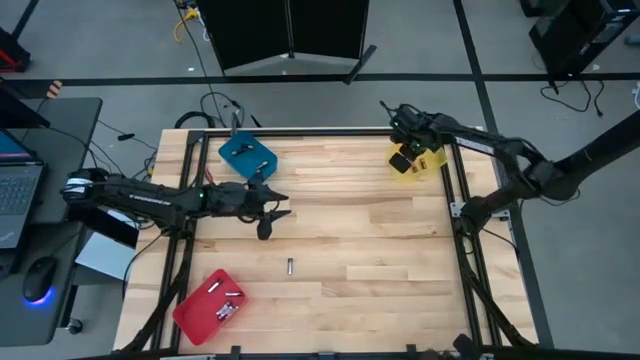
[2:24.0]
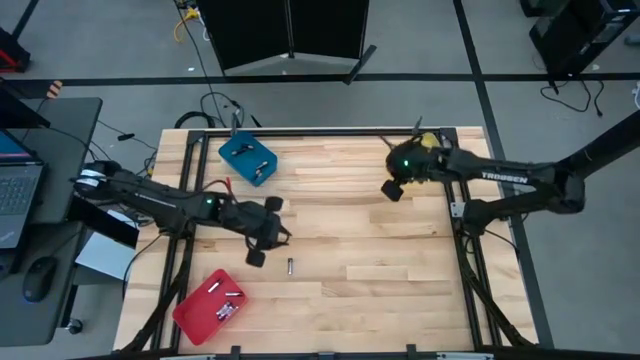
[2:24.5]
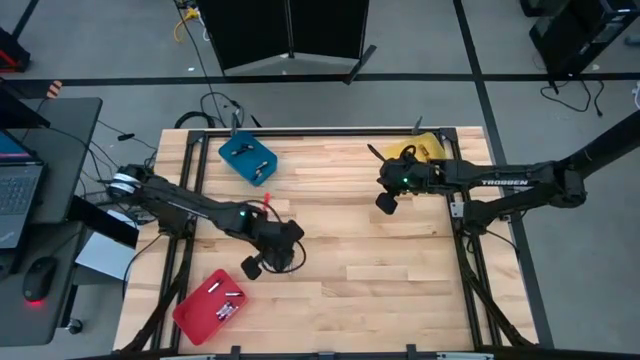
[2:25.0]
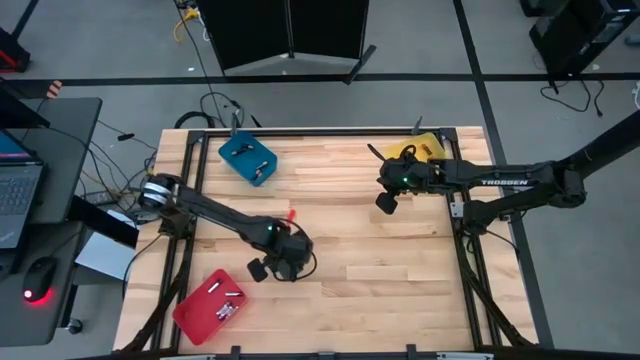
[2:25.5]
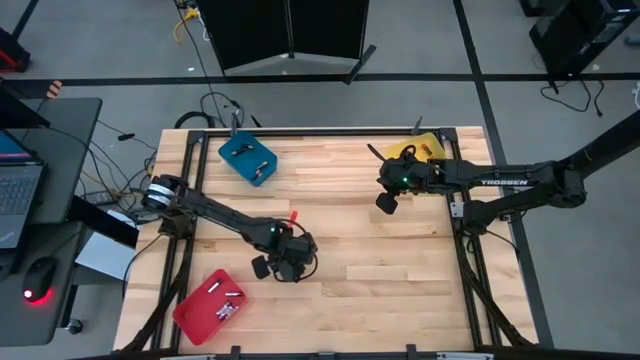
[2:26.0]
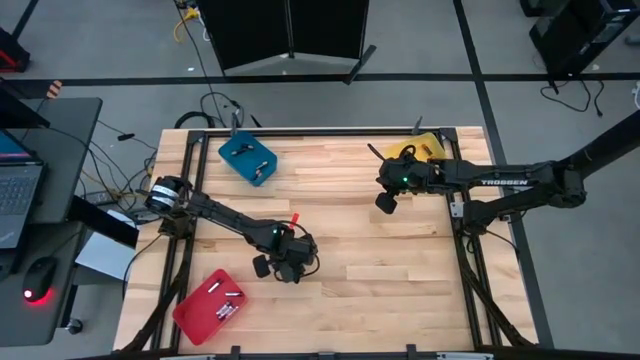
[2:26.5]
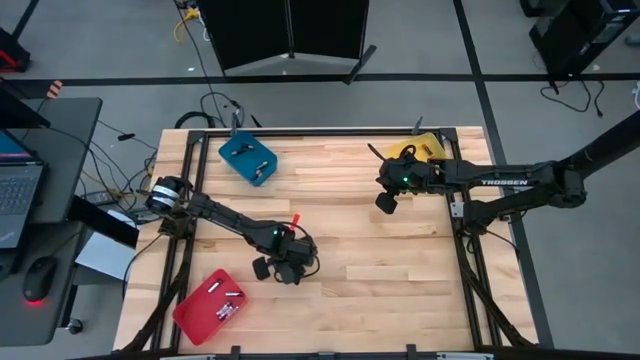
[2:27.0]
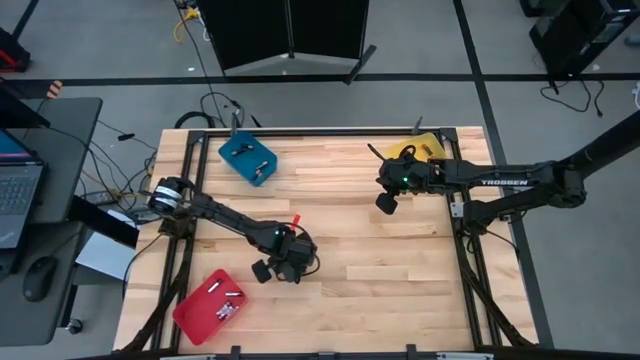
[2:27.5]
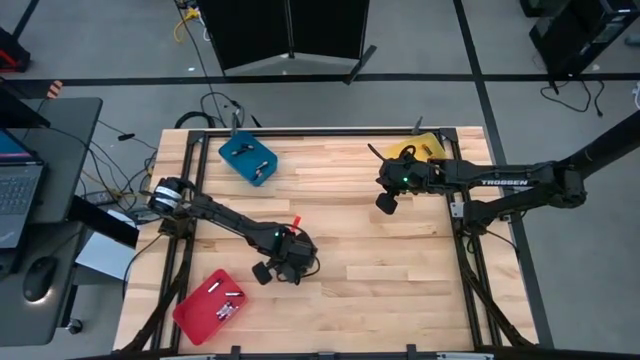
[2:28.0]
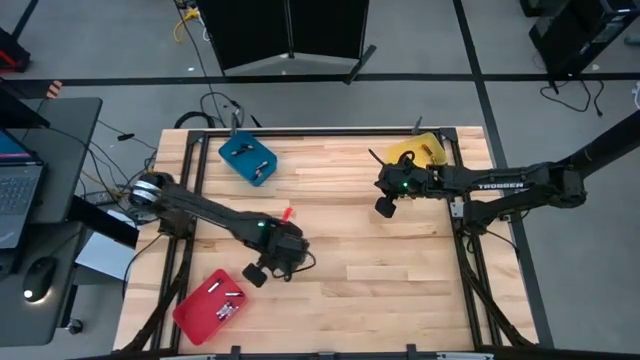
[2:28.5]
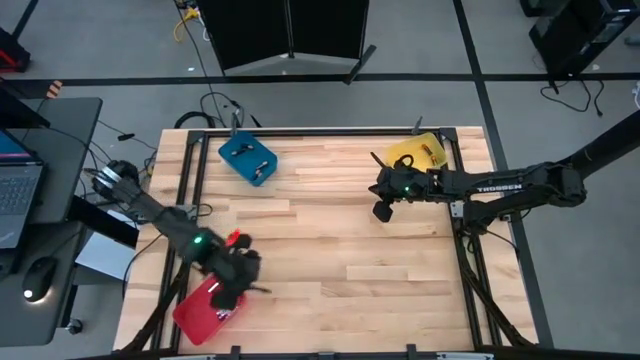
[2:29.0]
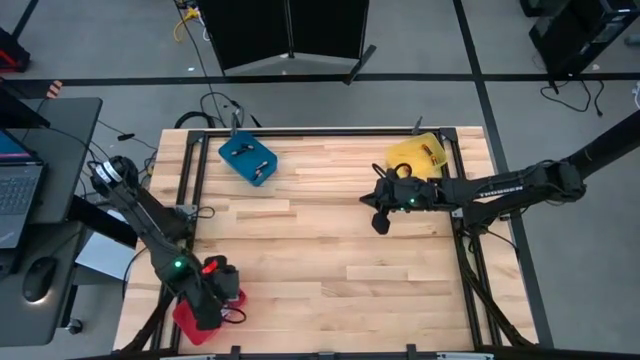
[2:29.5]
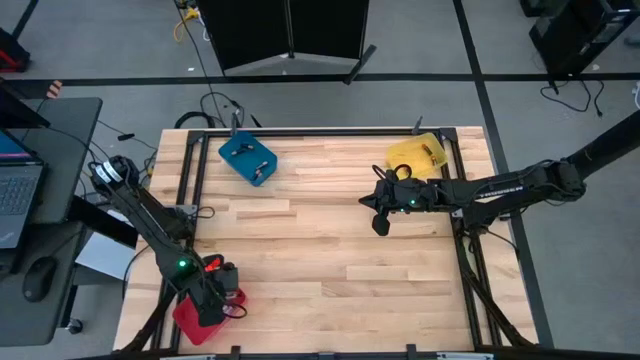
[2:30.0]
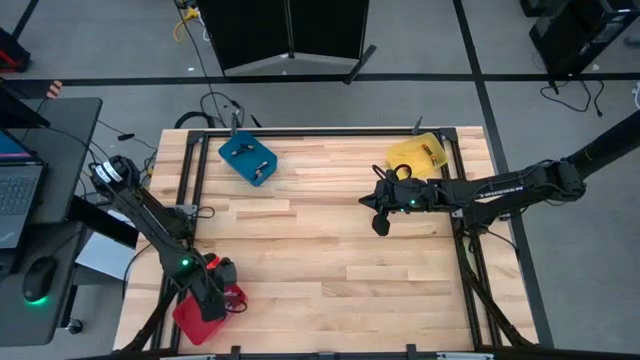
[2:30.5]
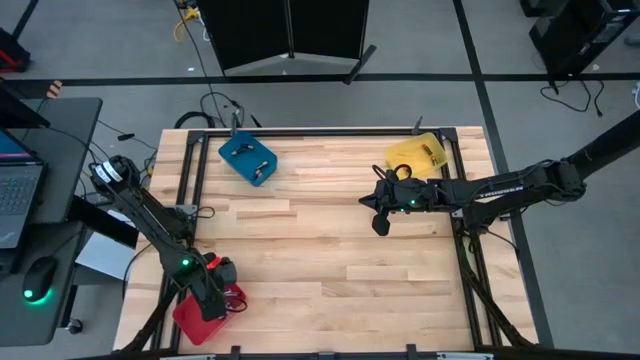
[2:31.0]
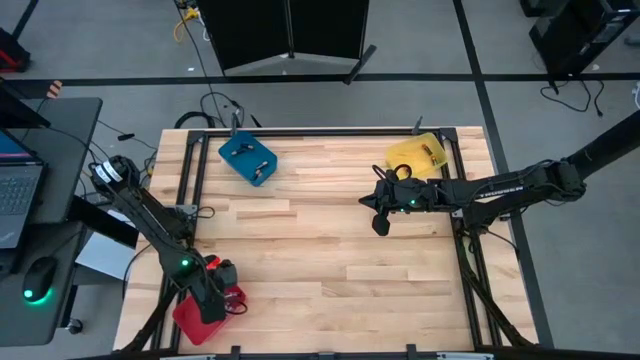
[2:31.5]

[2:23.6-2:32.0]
Task: Sort batteries
Put the black silver battery into the red bin

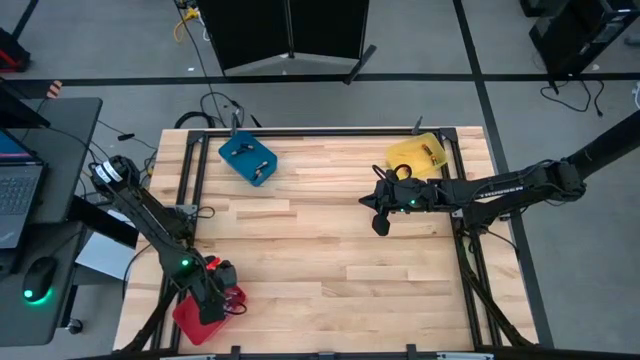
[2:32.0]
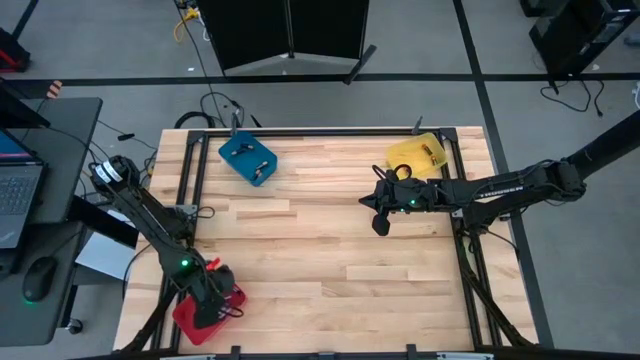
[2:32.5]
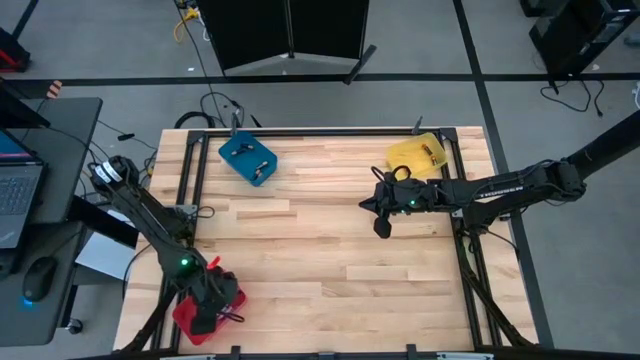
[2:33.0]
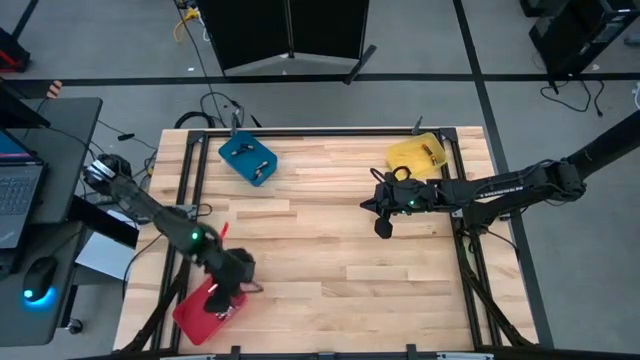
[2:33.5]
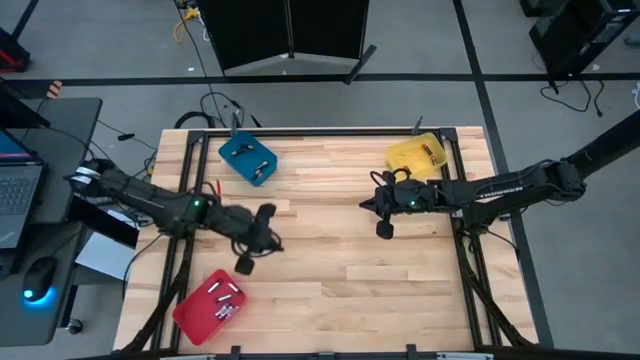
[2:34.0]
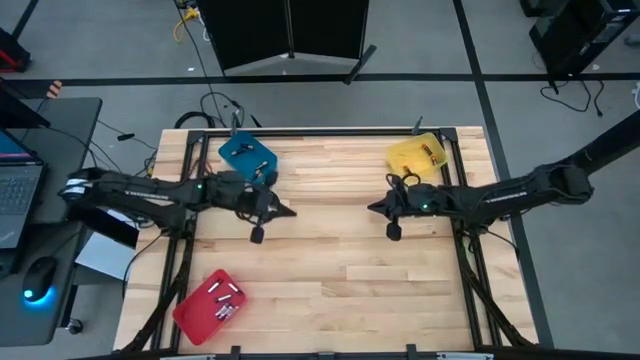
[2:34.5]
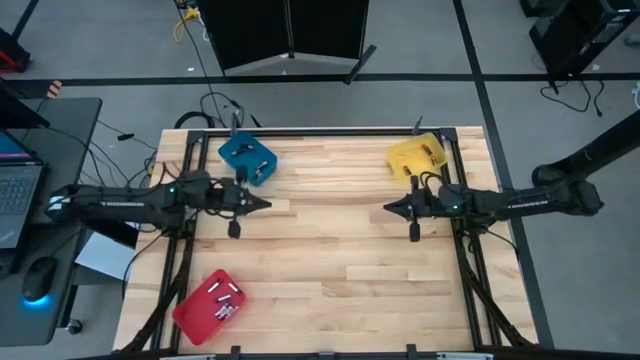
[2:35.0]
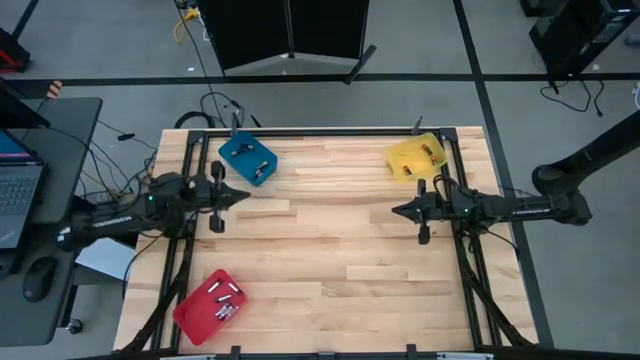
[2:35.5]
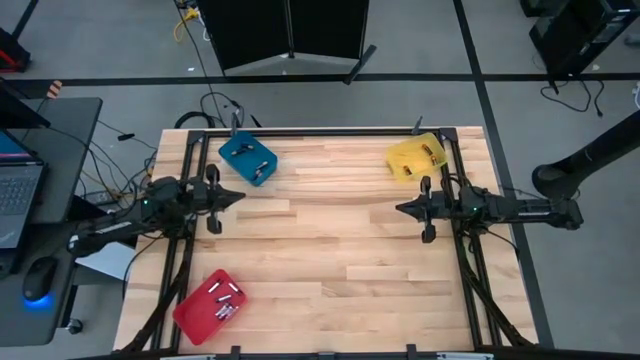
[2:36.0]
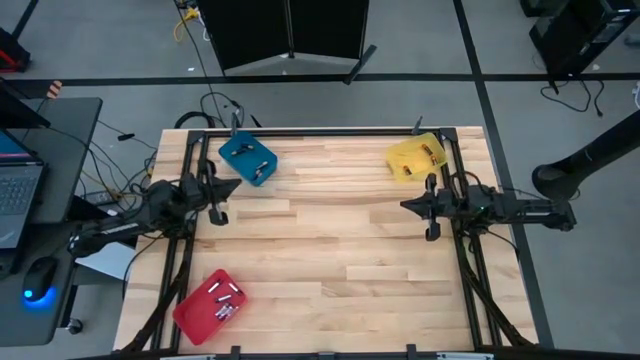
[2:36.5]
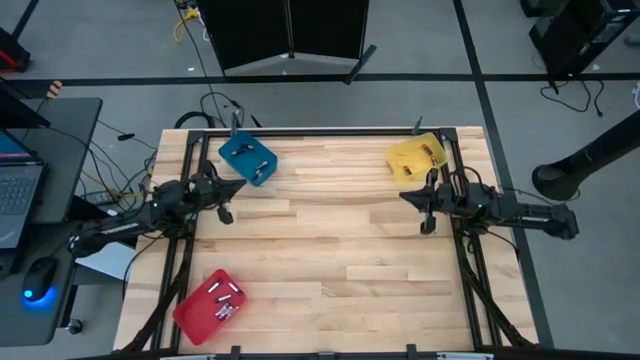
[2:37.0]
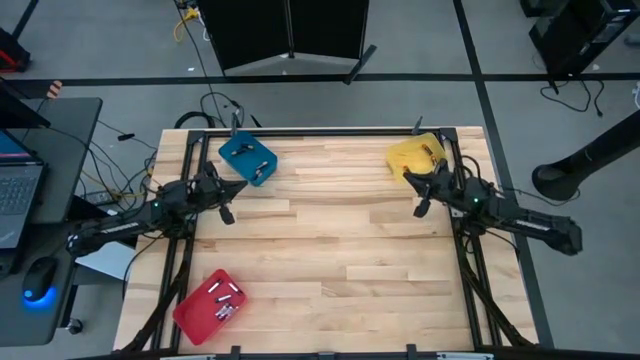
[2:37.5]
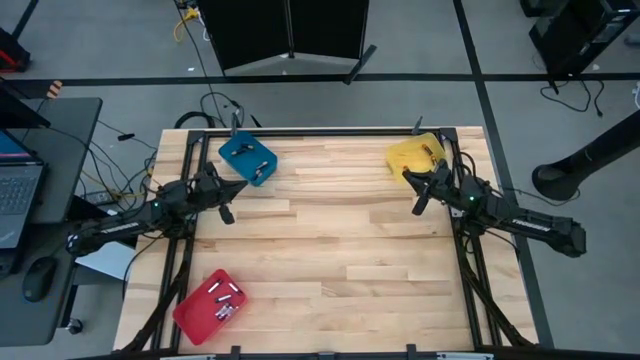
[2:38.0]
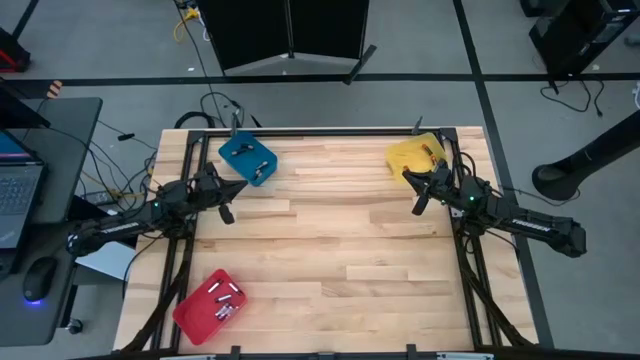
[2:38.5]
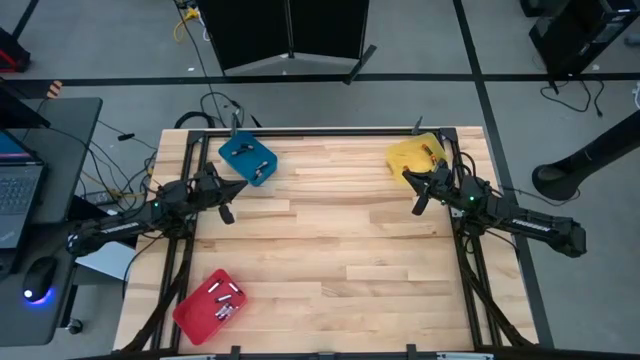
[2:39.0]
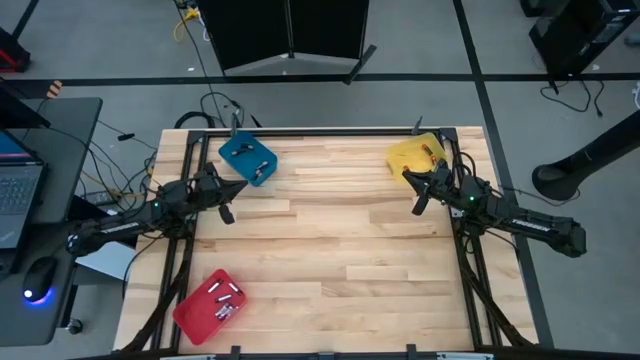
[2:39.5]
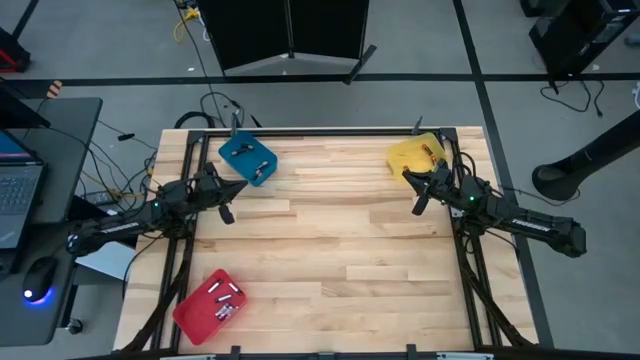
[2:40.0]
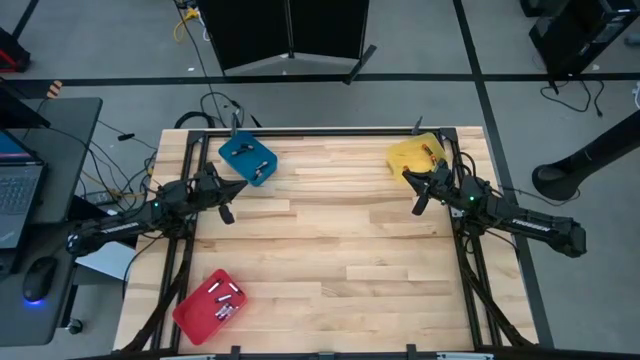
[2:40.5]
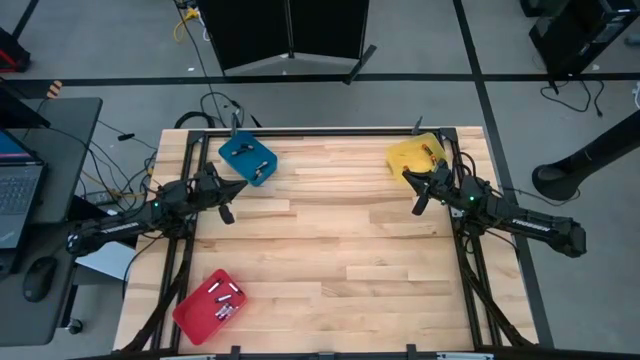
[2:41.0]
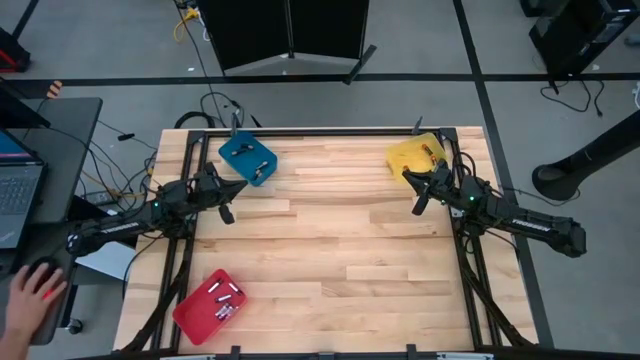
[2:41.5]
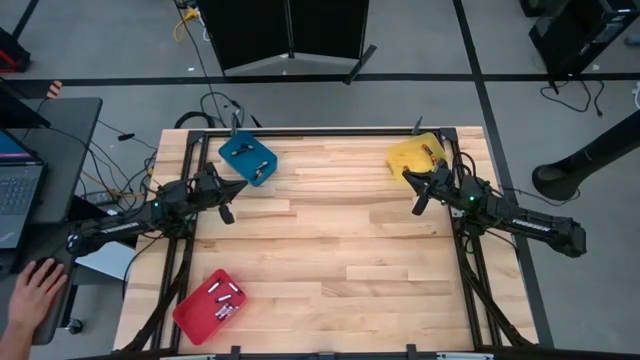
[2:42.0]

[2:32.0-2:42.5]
Return to Home Position

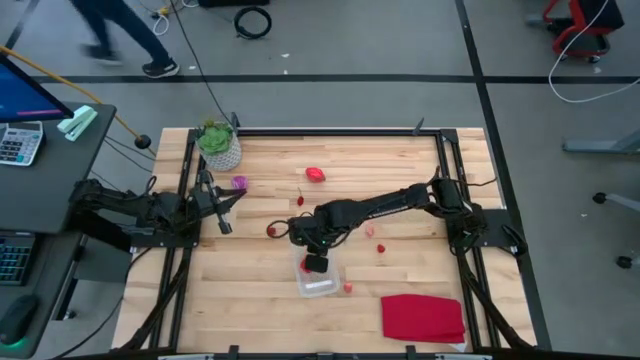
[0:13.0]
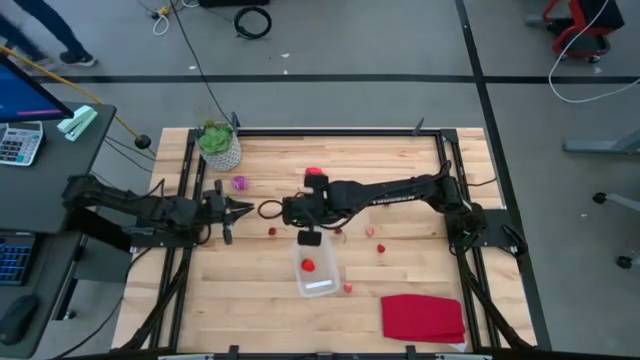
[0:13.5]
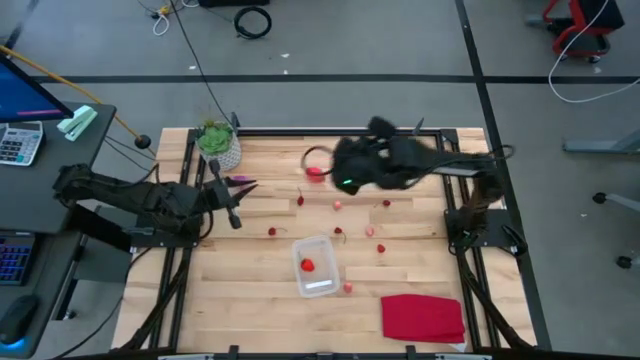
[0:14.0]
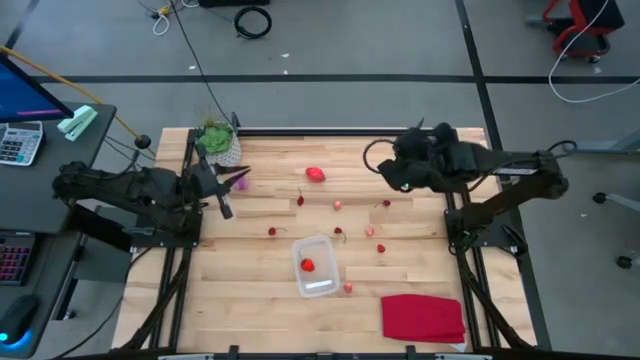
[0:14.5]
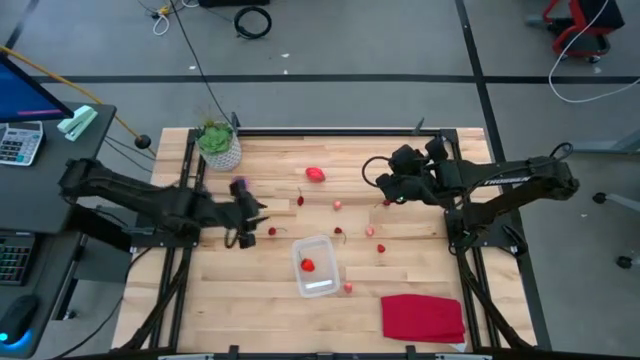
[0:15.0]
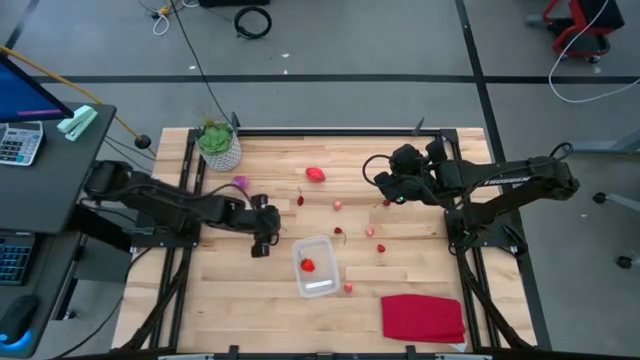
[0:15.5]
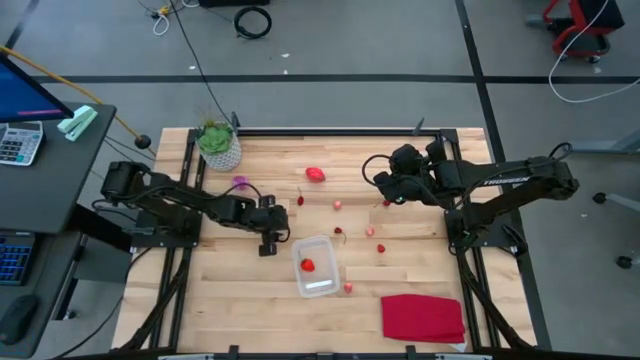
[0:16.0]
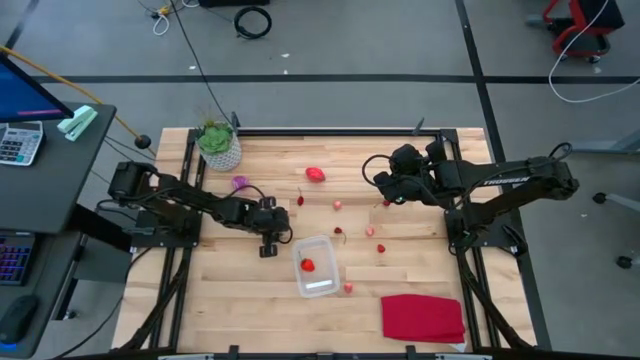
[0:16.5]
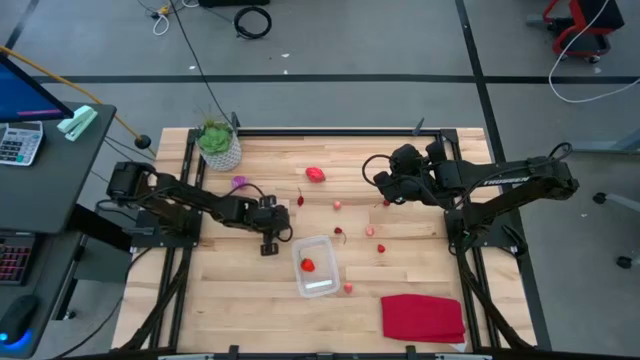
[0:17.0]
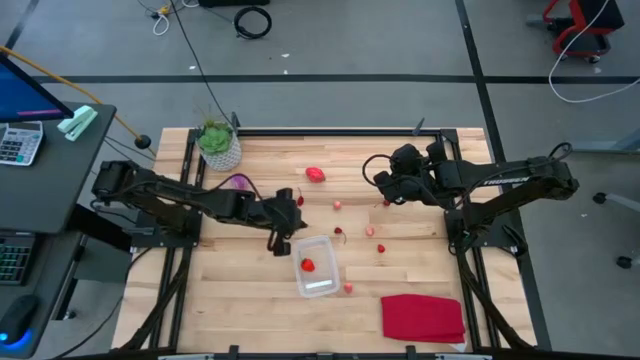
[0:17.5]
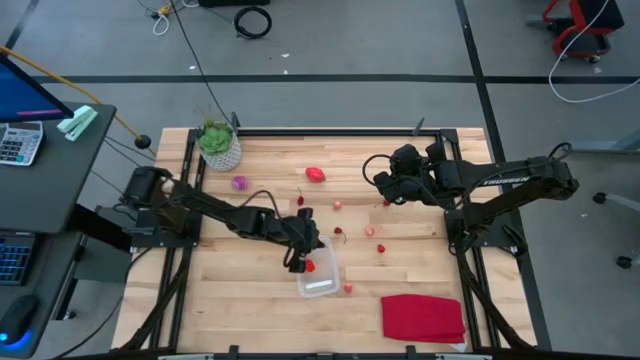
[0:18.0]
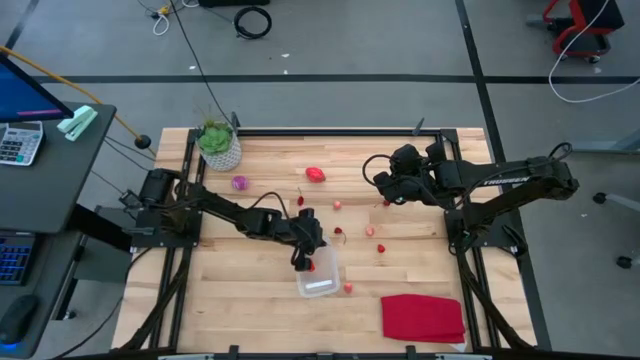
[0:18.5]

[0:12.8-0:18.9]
Task: Pick and placing Produce into tupperware
Put the bottom left red cherry into the transparent bin
